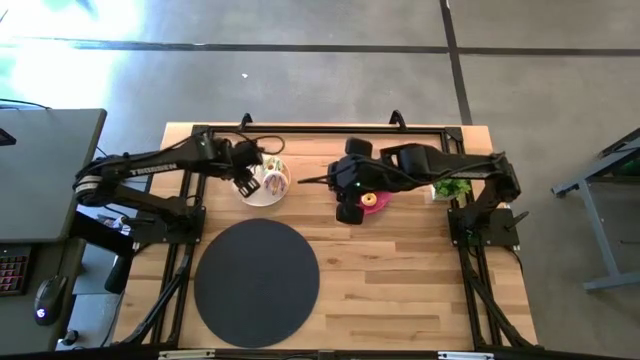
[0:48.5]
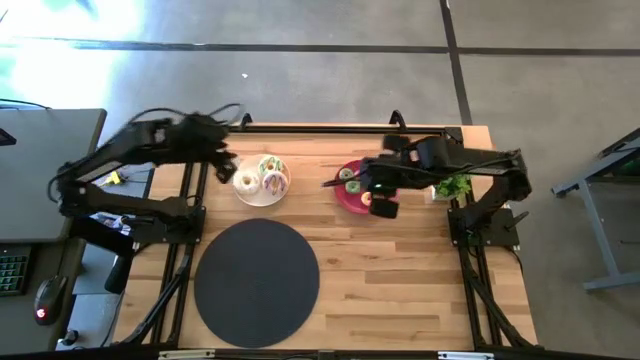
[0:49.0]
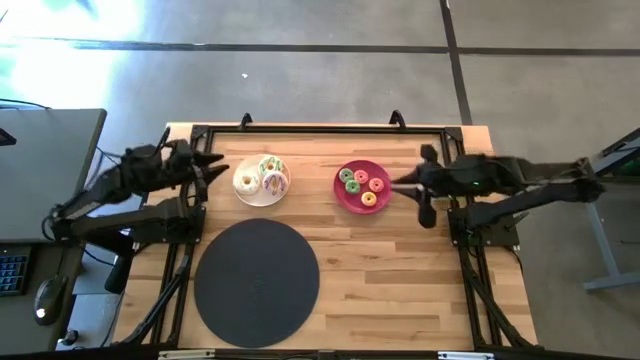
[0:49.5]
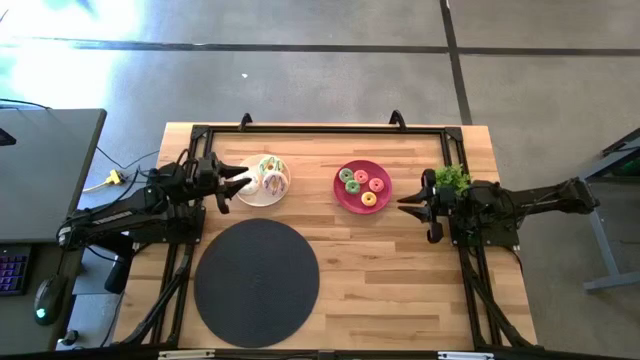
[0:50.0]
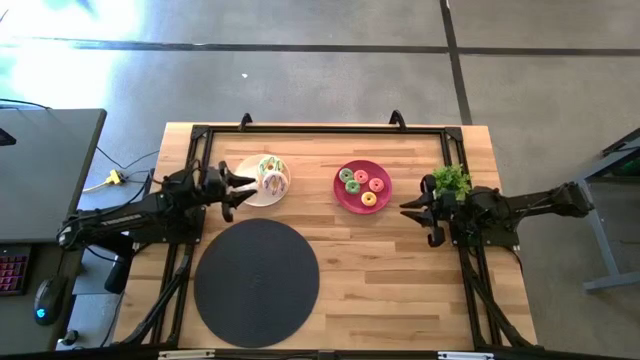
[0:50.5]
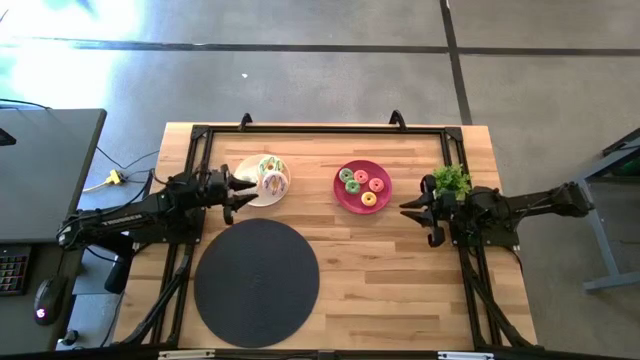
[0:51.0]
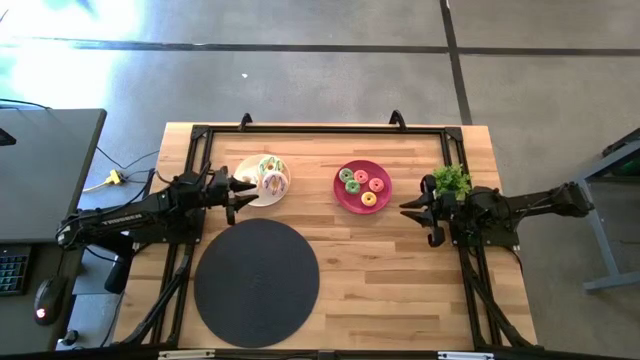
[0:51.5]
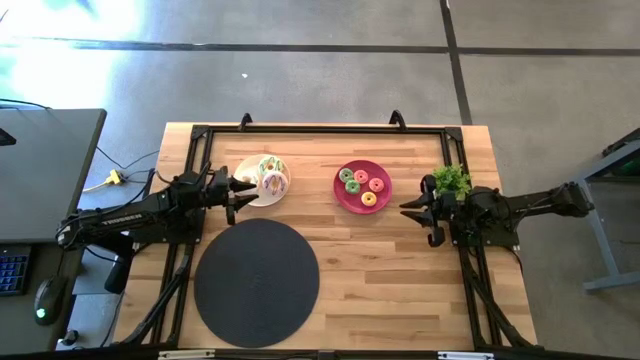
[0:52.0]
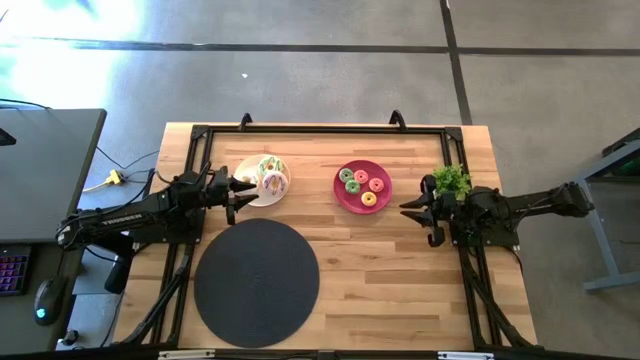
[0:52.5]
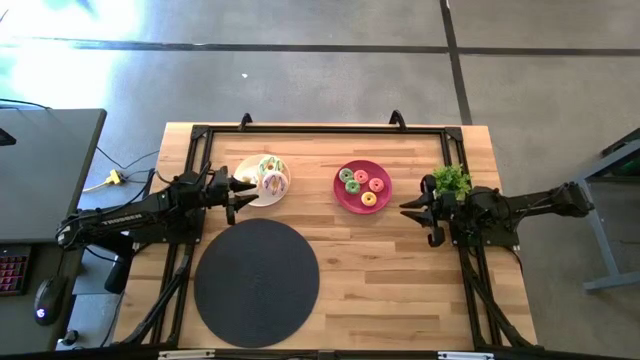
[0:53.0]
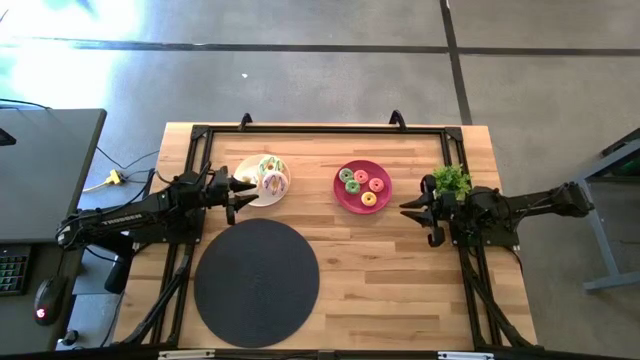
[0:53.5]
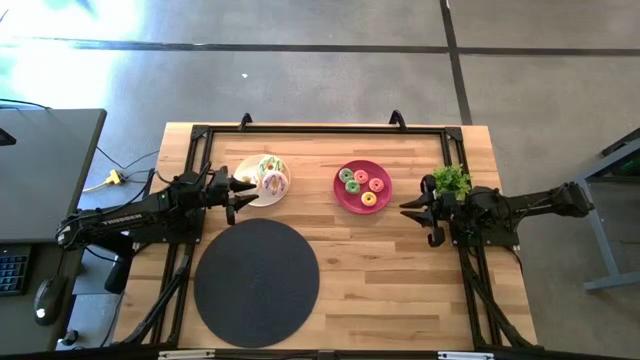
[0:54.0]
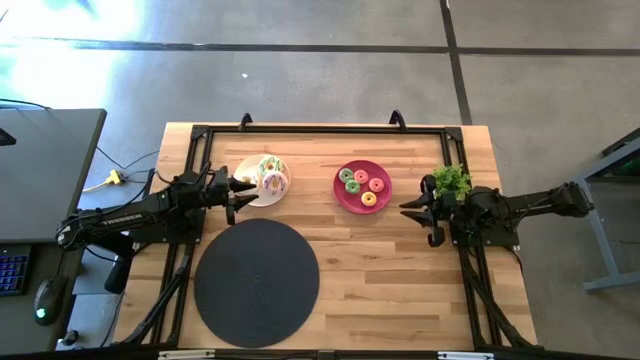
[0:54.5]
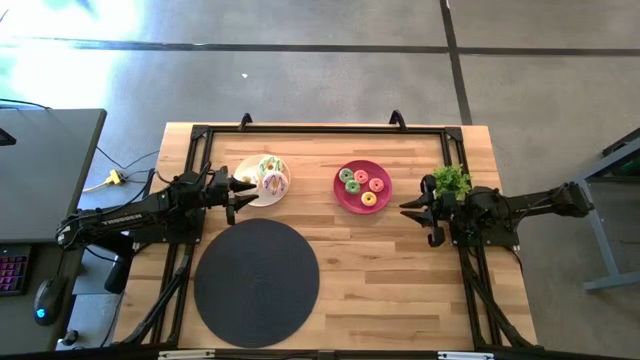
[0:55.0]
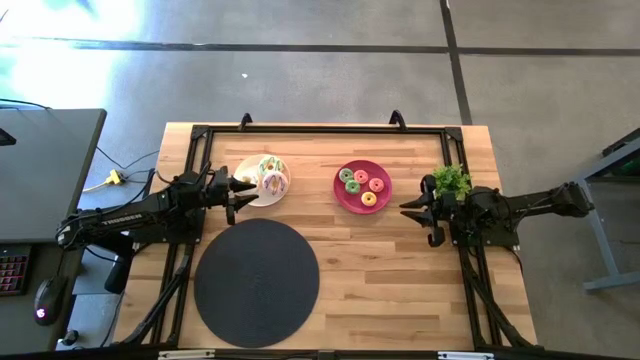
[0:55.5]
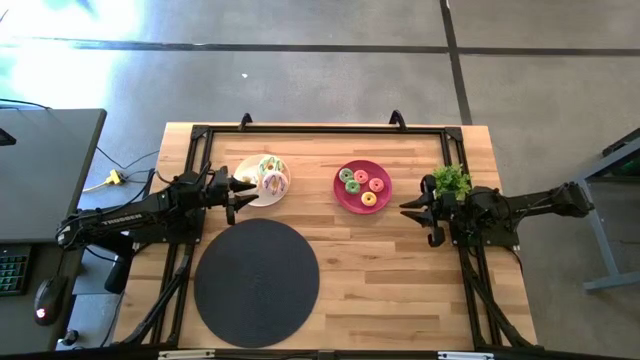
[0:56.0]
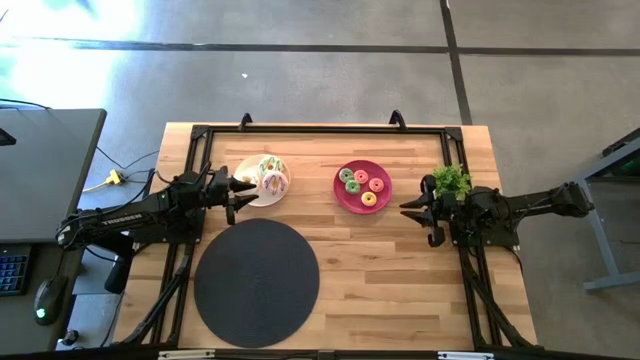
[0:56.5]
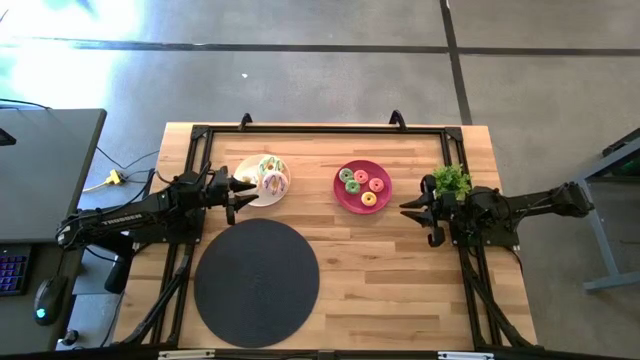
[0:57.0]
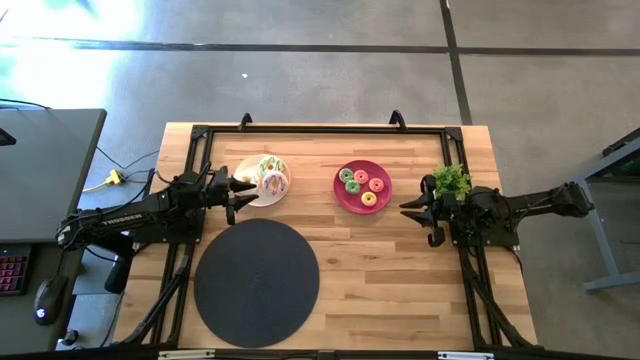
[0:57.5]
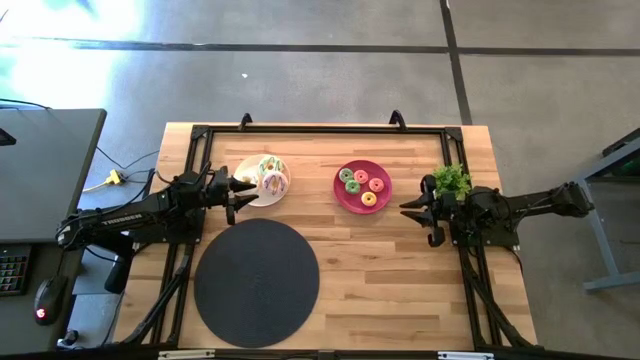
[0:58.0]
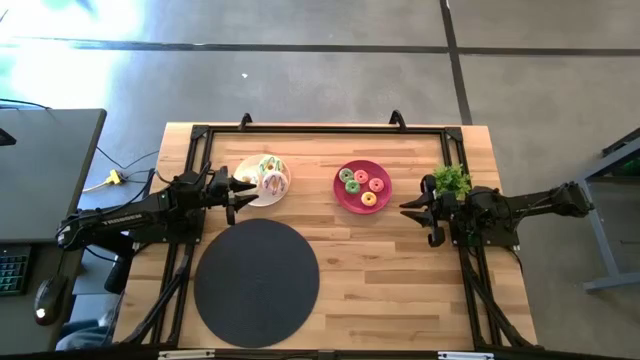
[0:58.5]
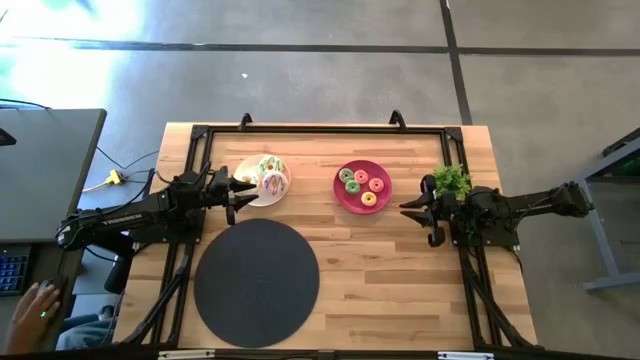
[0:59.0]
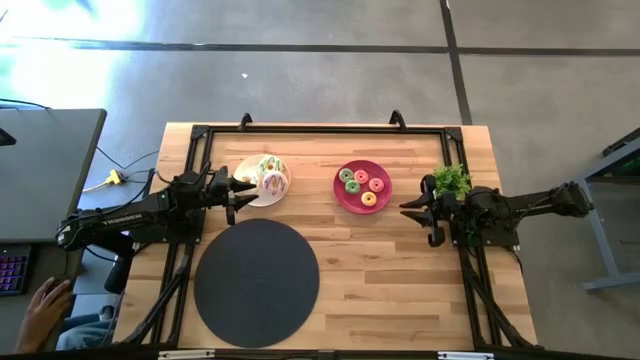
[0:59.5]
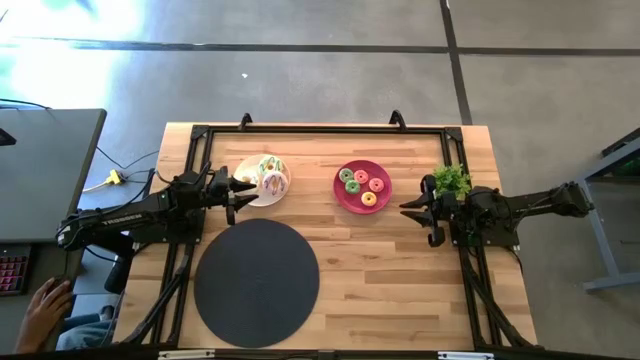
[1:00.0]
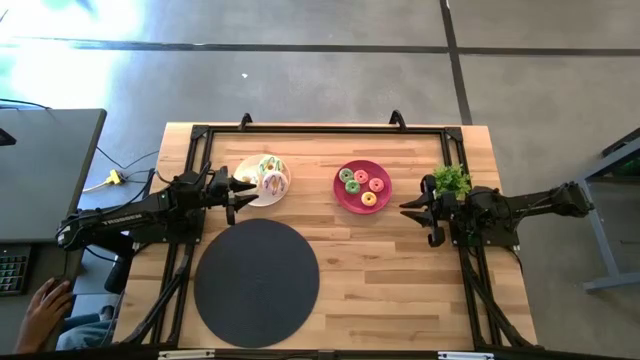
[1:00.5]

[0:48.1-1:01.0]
Task: Pick & Place donuts
Return to Home Position

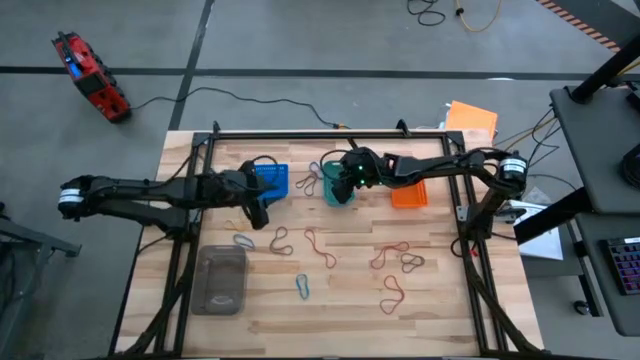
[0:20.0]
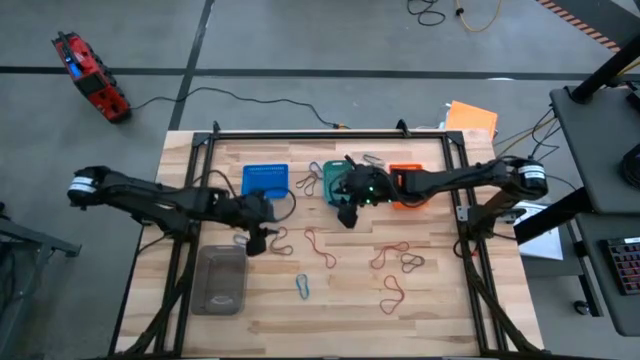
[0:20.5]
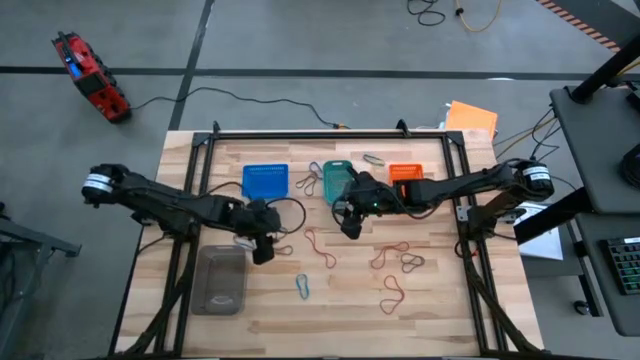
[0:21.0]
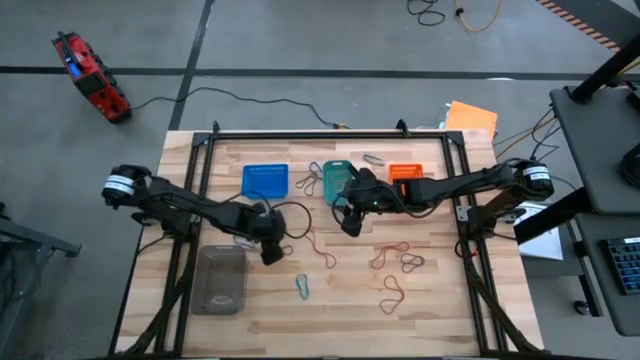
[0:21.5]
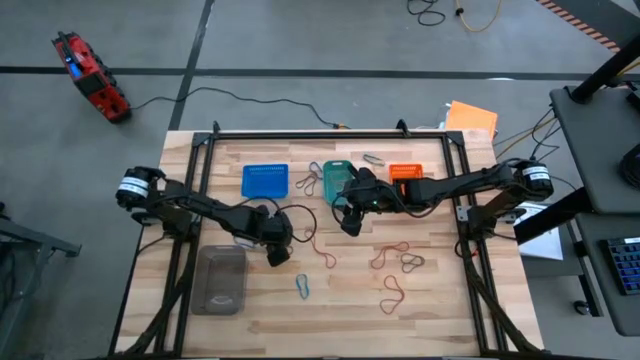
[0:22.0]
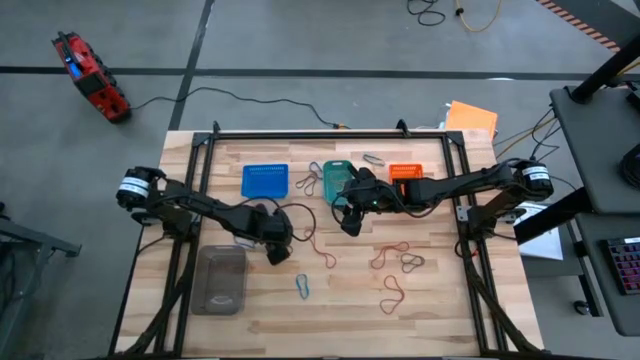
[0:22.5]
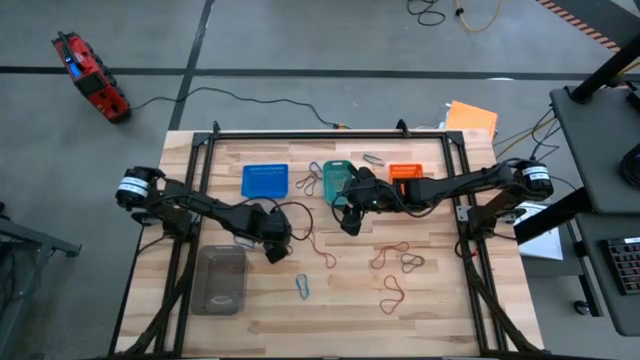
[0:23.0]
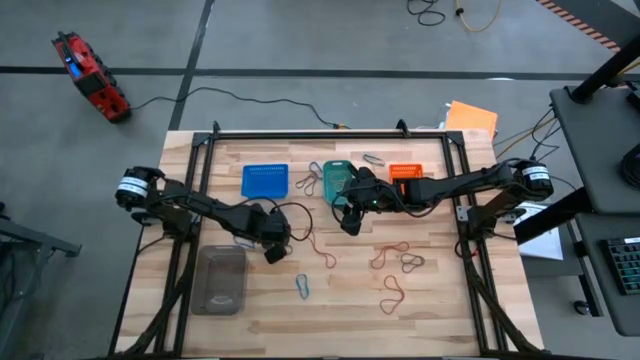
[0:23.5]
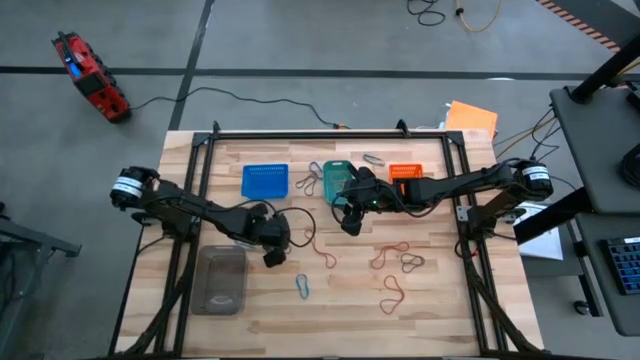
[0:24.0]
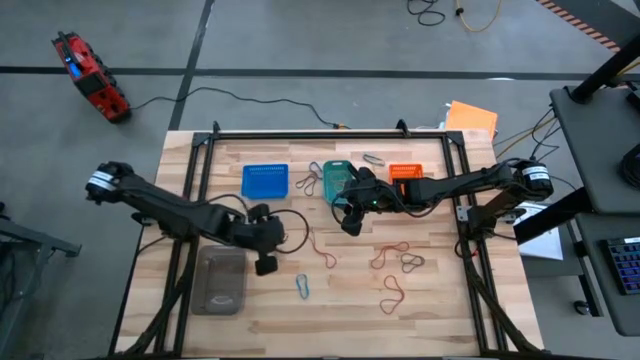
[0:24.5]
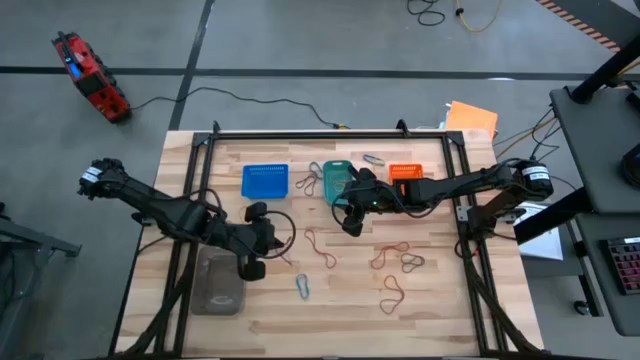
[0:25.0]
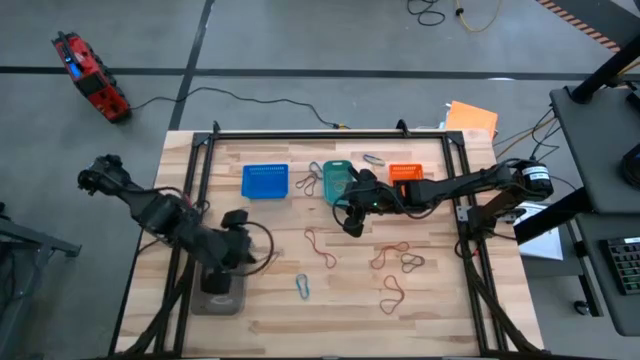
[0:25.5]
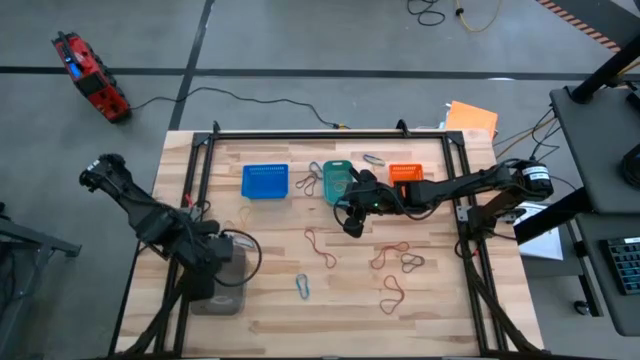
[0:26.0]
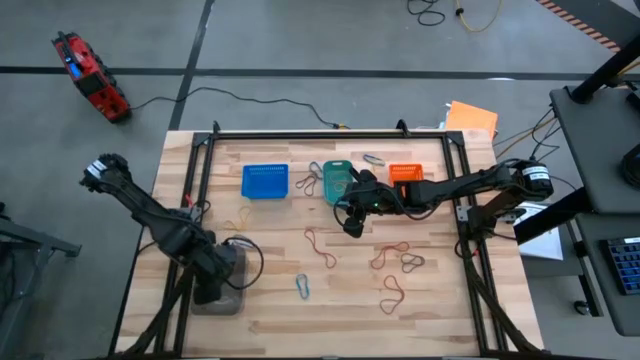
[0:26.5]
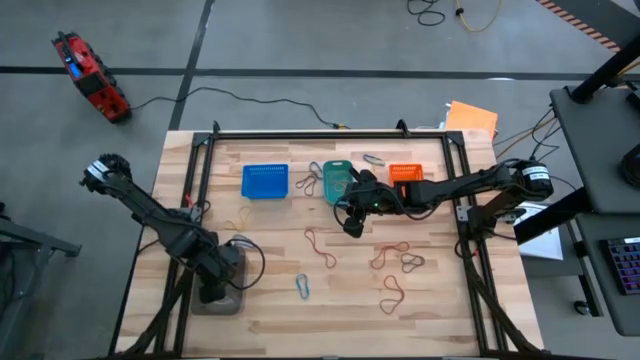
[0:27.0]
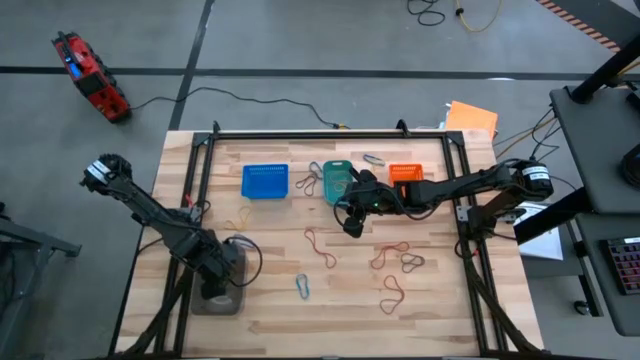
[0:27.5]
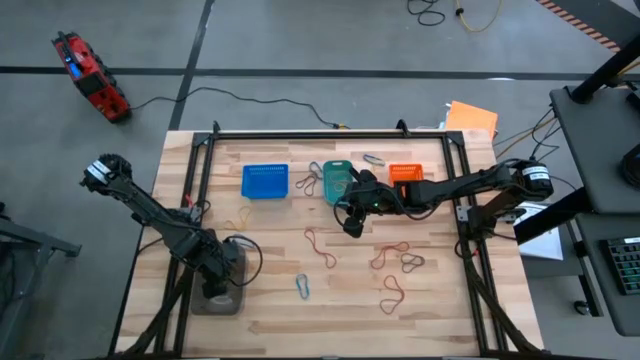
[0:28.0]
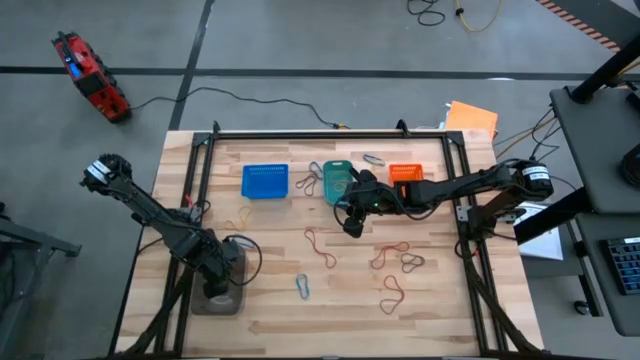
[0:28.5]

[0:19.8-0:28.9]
Task: Sort rubber bands into baskets
Put the bottom left black rubber band into the black bin
